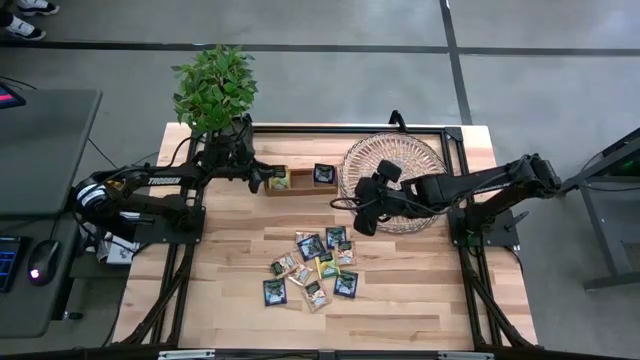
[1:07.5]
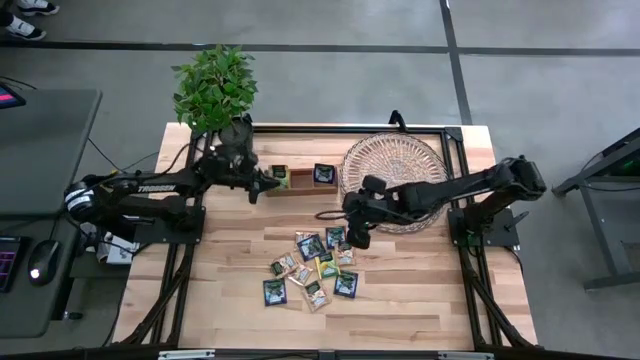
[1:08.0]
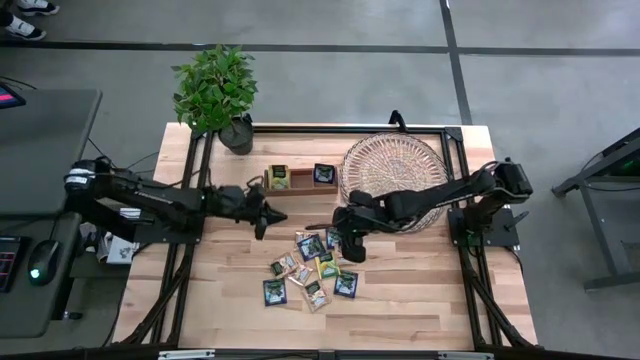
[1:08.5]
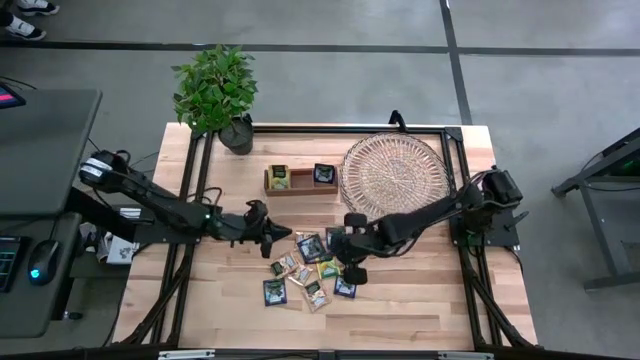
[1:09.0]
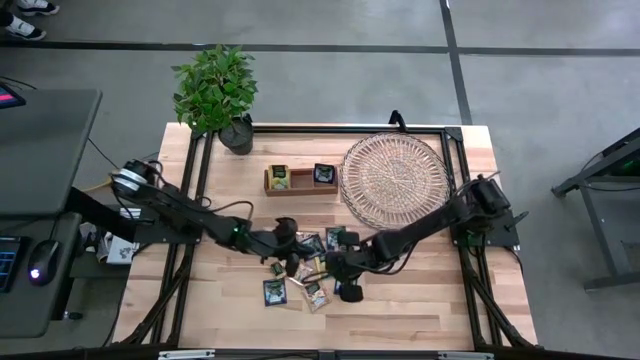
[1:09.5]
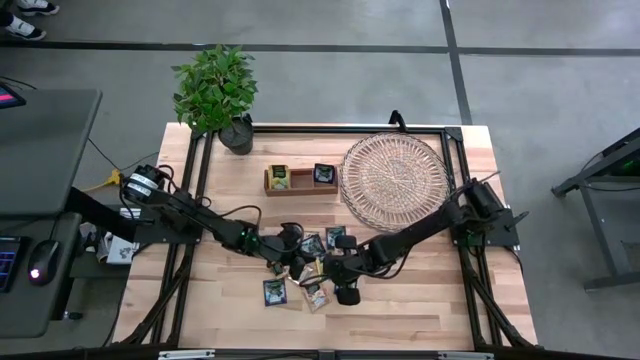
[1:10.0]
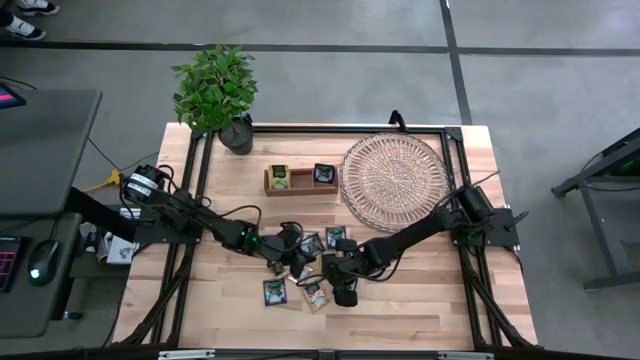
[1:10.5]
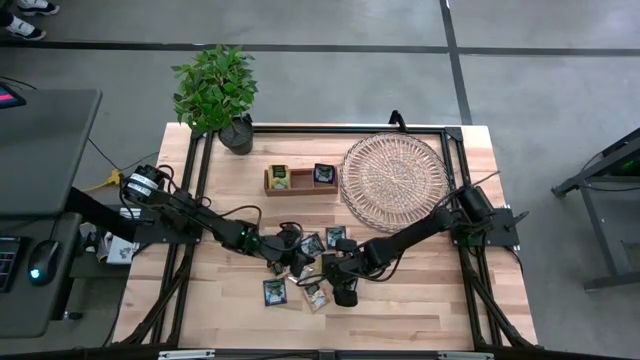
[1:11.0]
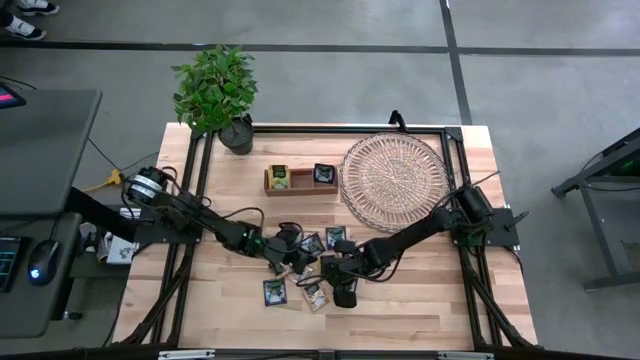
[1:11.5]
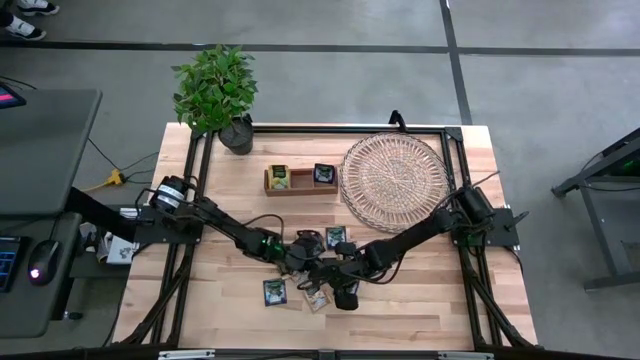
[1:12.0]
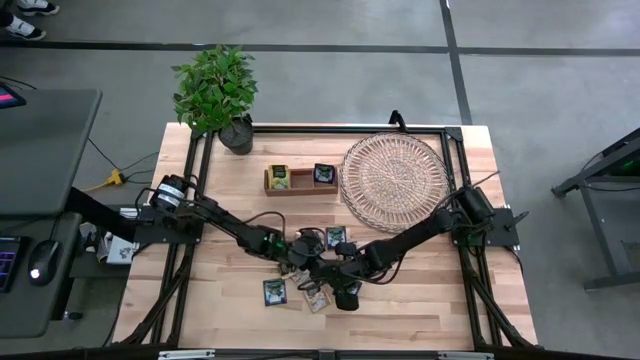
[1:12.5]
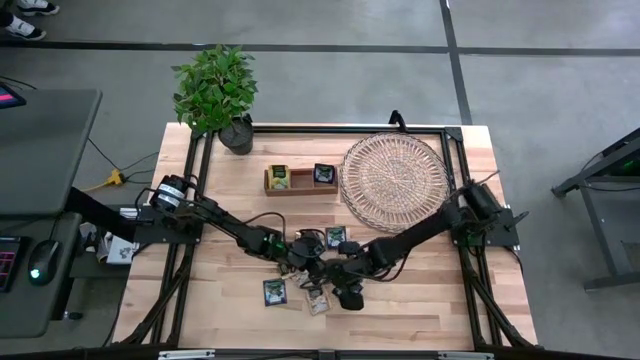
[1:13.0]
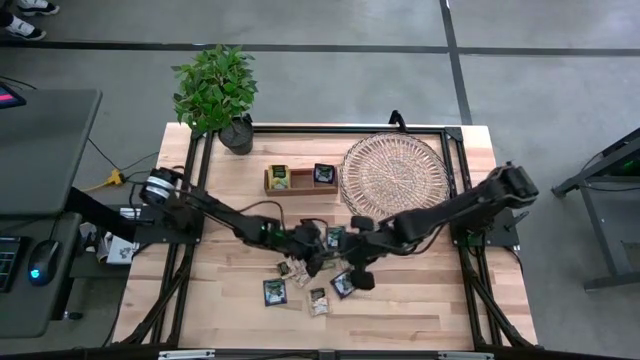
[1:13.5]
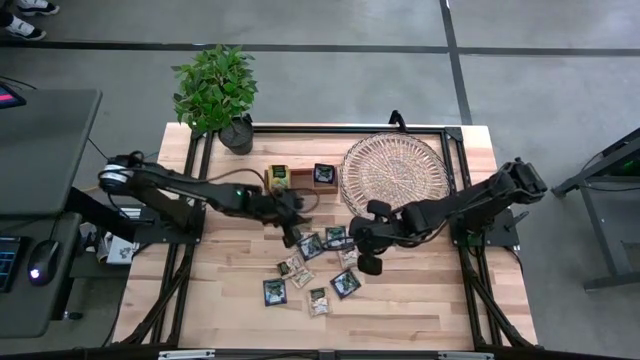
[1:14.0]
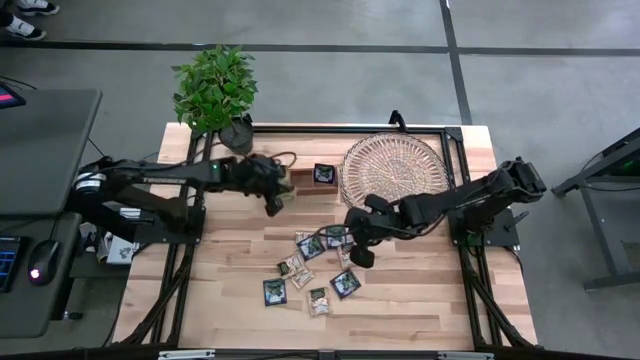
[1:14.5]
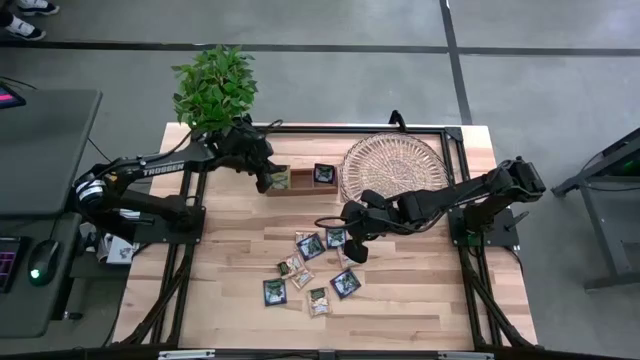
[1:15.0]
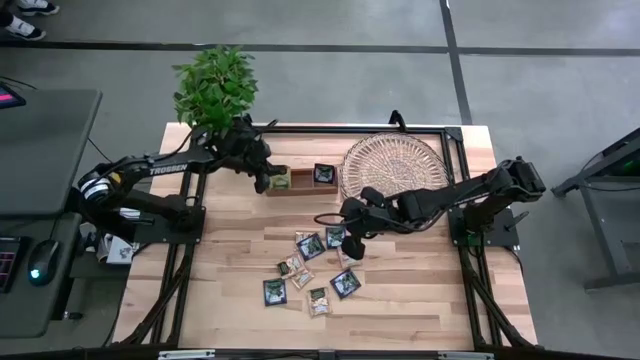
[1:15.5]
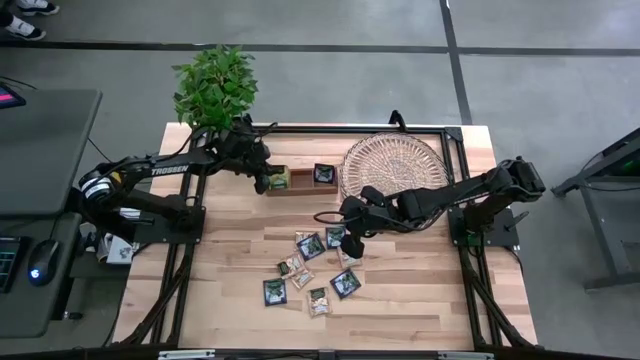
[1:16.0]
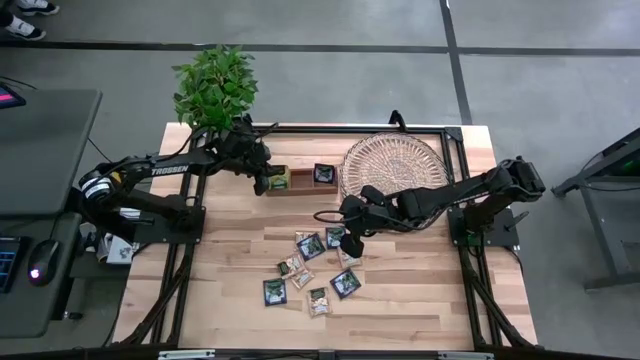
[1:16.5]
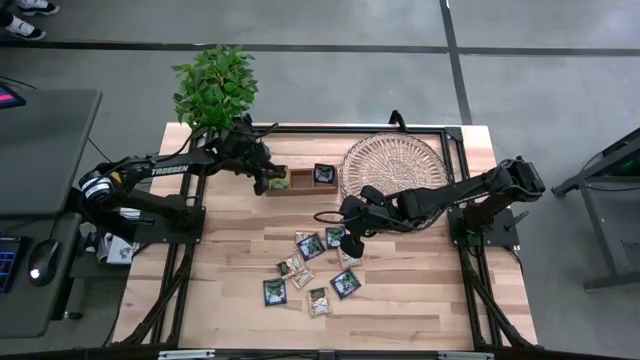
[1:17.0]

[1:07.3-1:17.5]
Task: Pick & Place Tea
Put the yellow tea bag into the left section of the wooden organizer

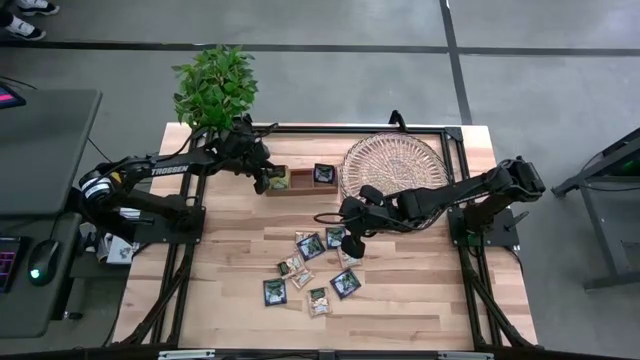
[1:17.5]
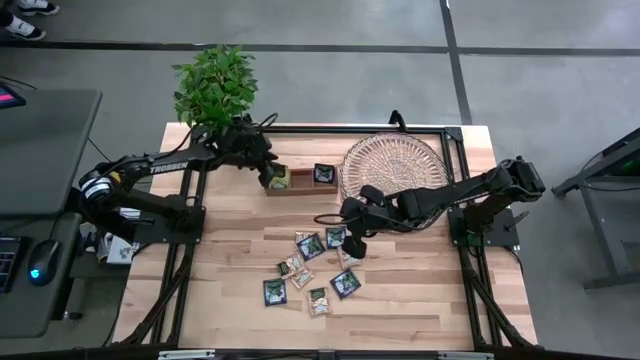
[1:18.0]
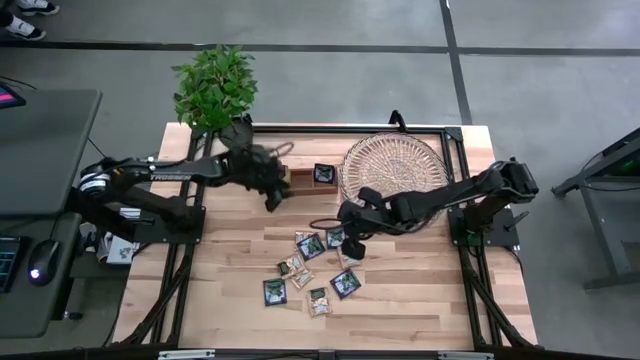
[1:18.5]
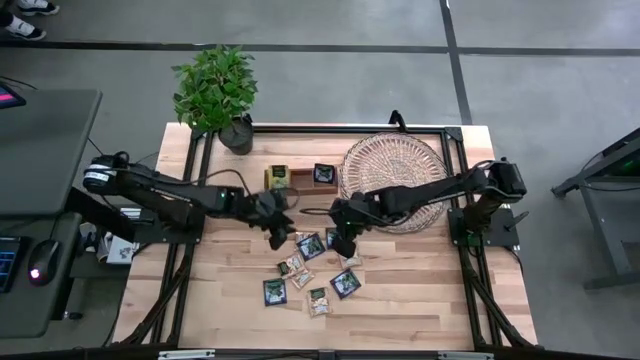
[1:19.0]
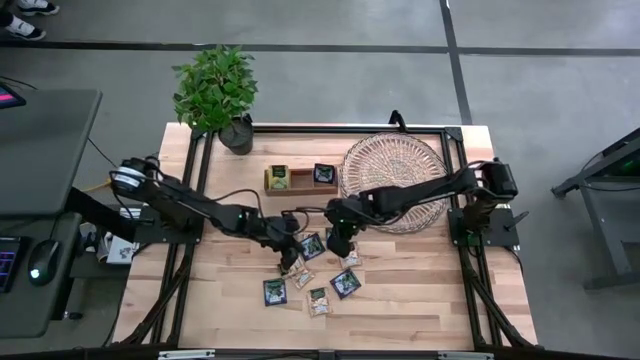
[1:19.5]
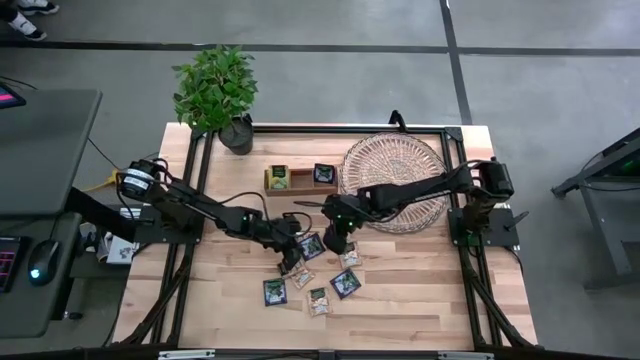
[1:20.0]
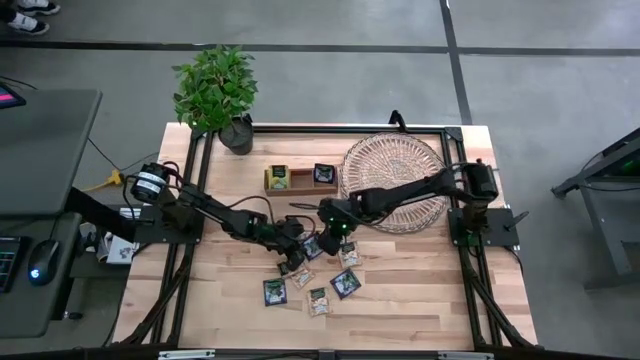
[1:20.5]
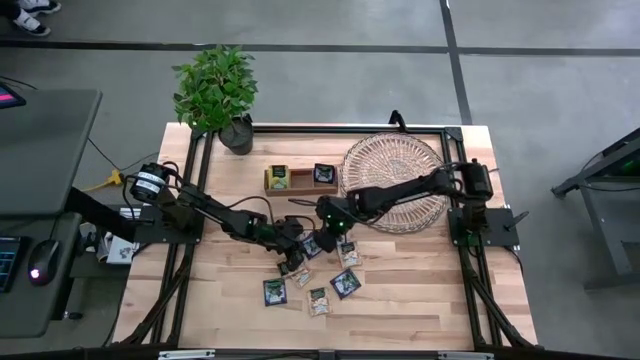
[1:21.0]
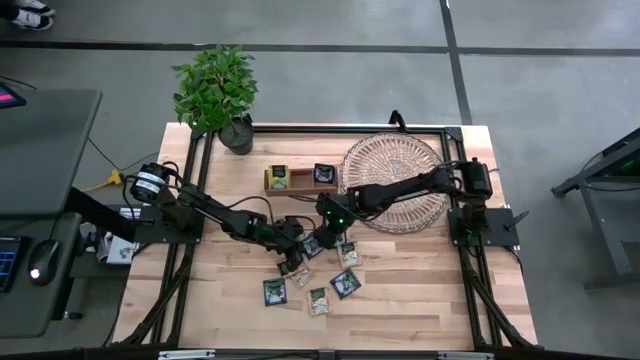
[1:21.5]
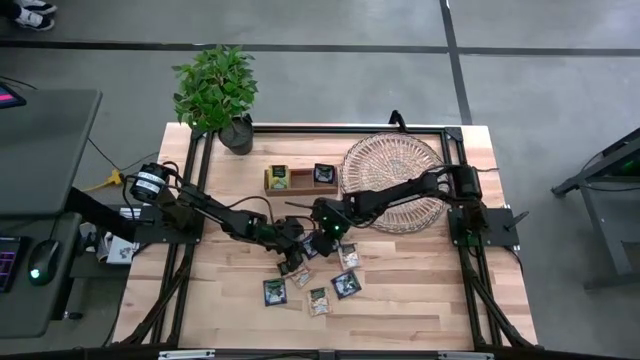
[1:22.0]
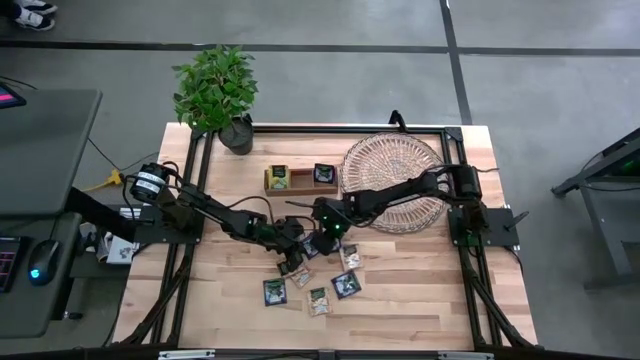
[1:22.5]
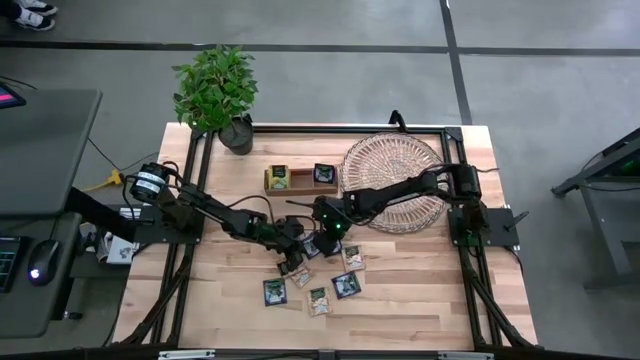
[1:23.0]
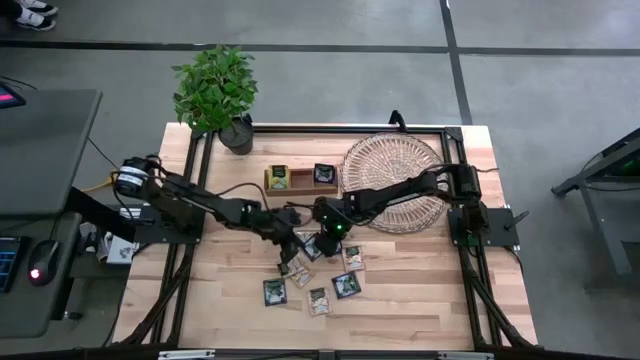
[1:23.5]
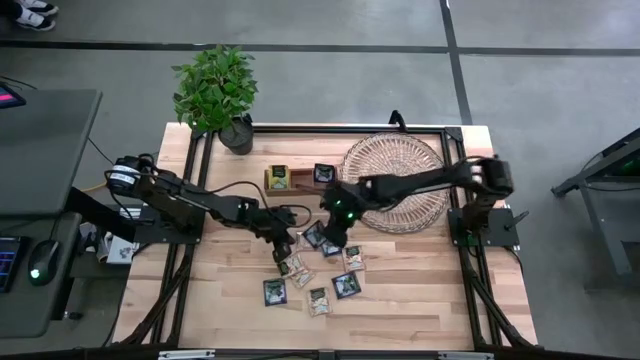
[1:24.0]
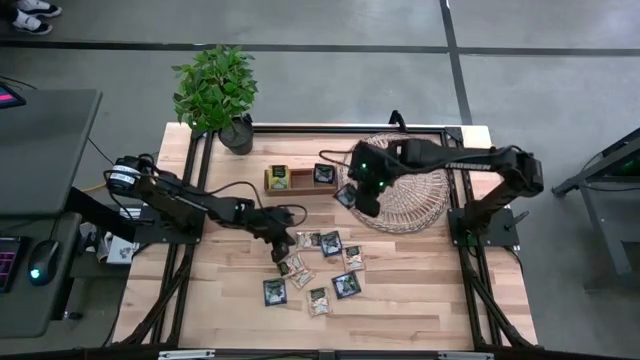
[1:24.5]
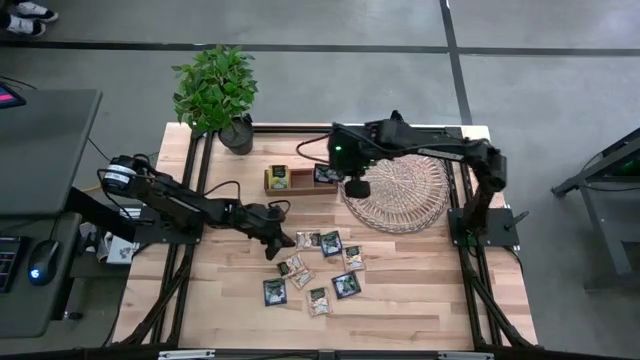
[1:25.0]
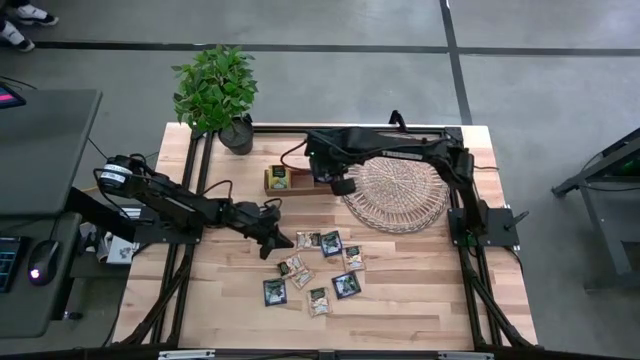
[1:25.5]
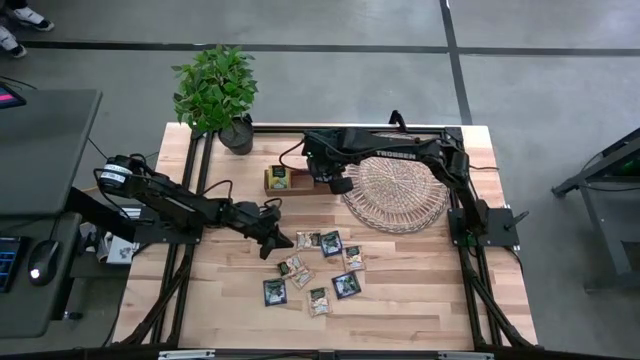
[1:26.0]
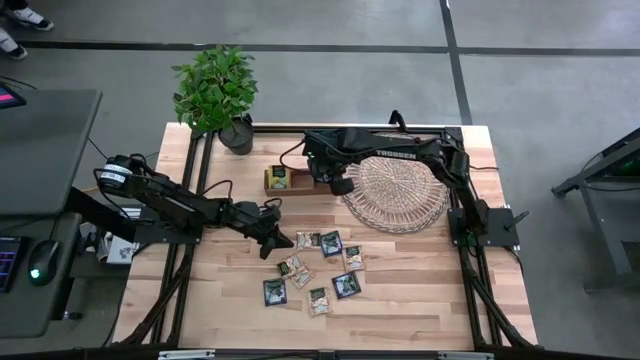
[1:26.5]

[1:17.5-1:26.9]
Put the blue tea bag into the right section of the wooden organizer
